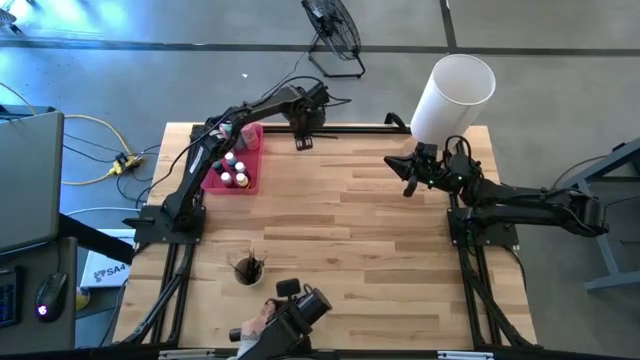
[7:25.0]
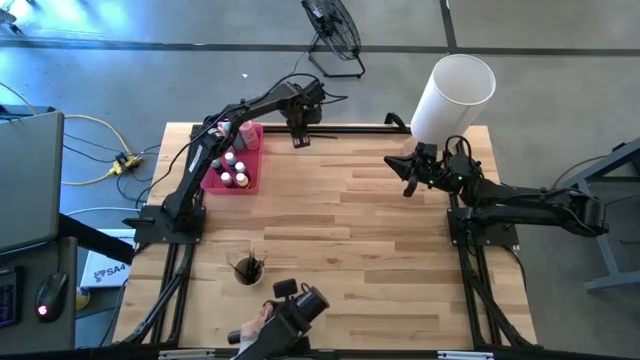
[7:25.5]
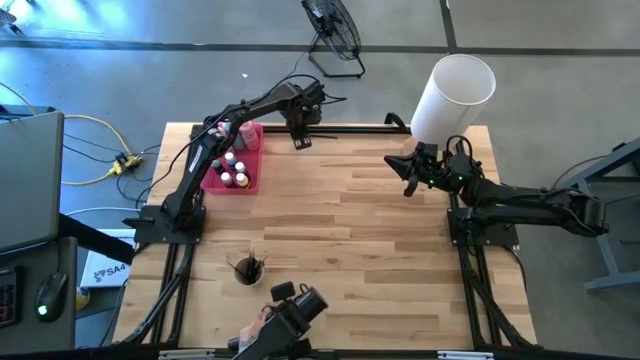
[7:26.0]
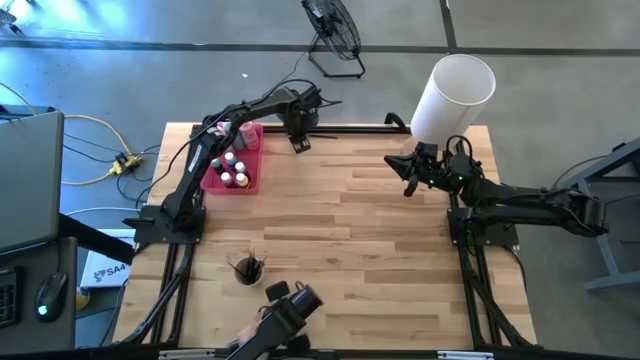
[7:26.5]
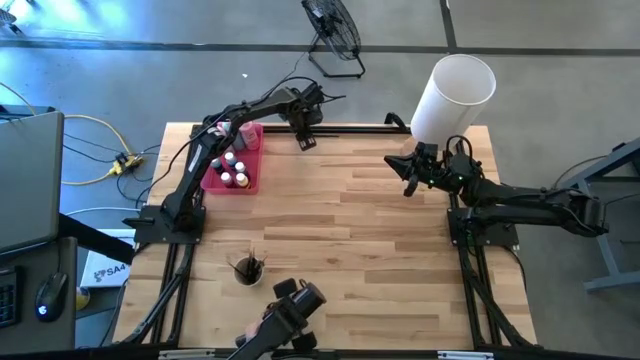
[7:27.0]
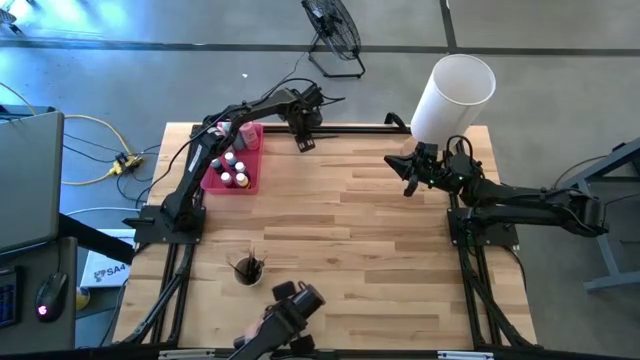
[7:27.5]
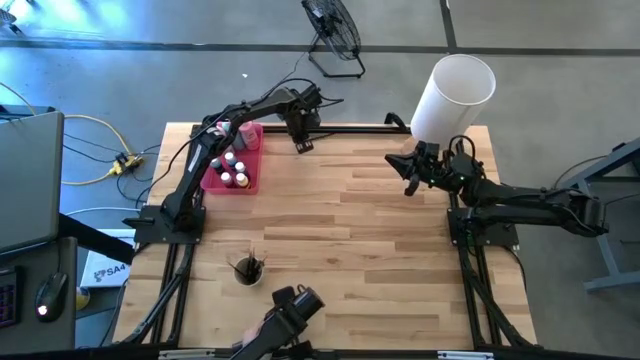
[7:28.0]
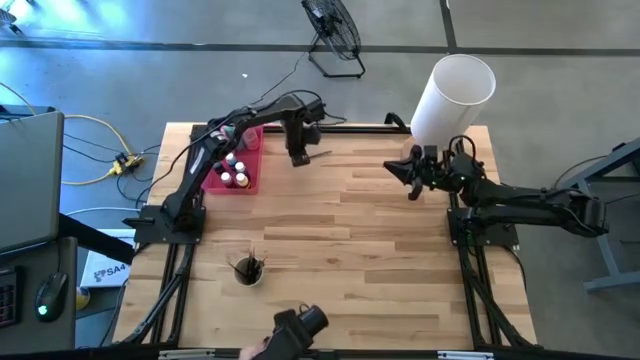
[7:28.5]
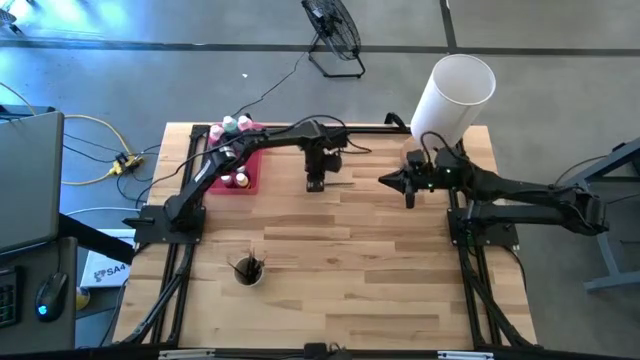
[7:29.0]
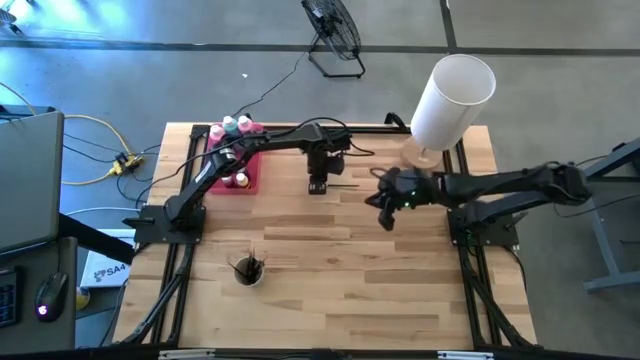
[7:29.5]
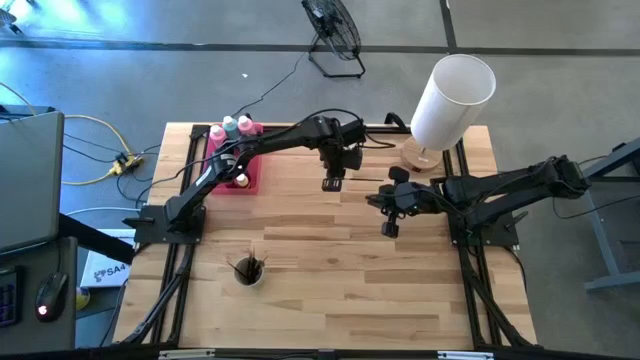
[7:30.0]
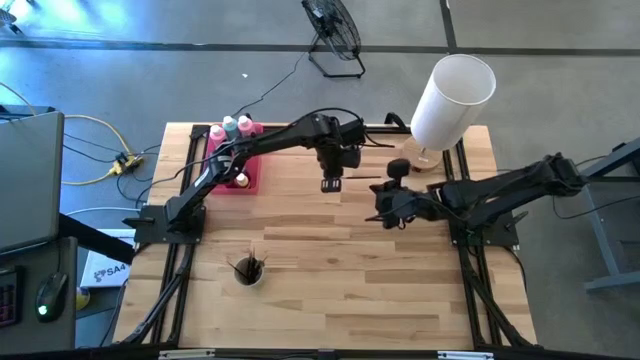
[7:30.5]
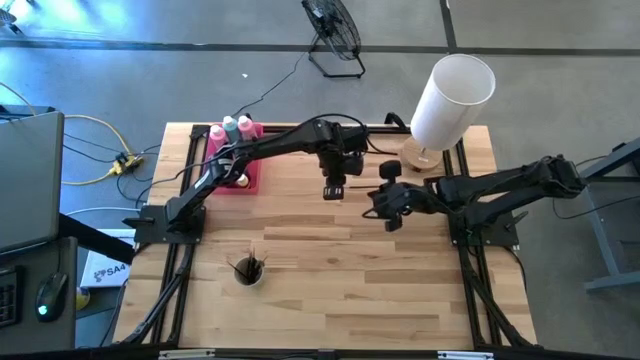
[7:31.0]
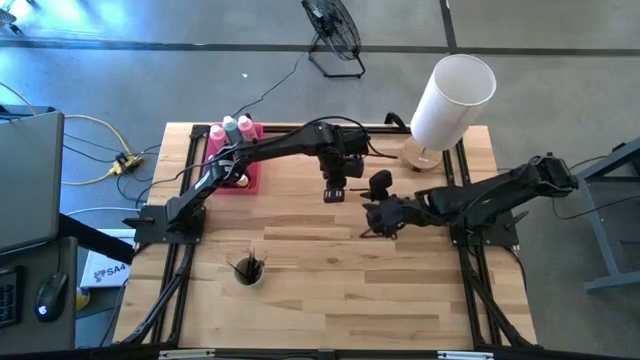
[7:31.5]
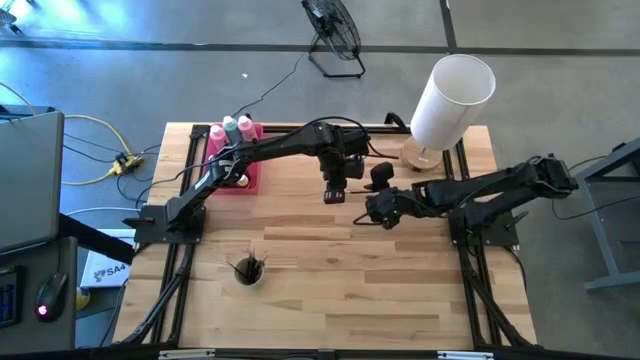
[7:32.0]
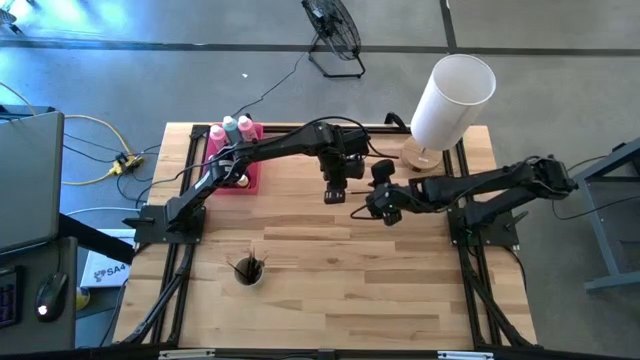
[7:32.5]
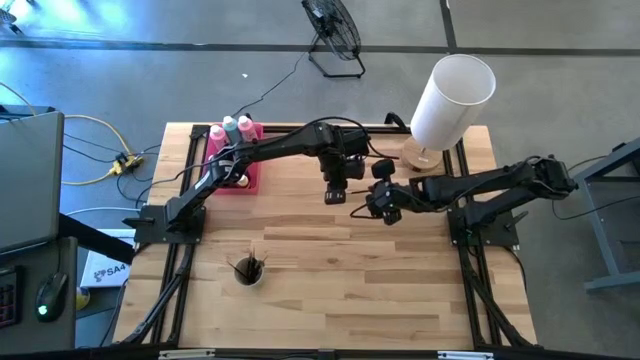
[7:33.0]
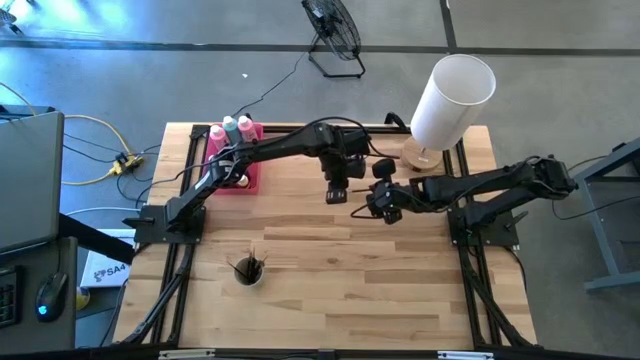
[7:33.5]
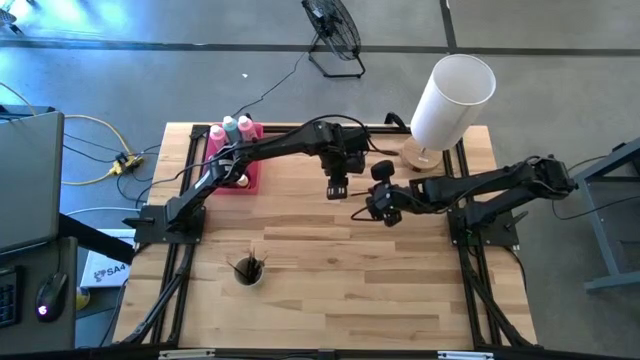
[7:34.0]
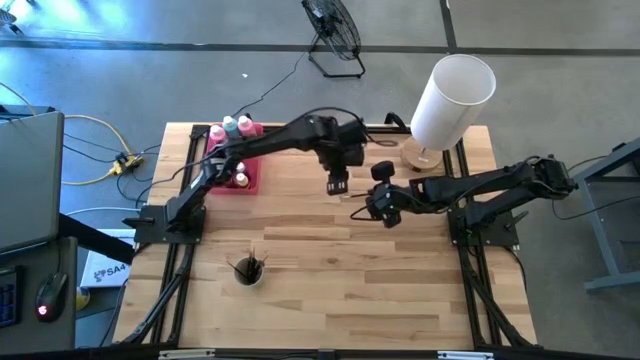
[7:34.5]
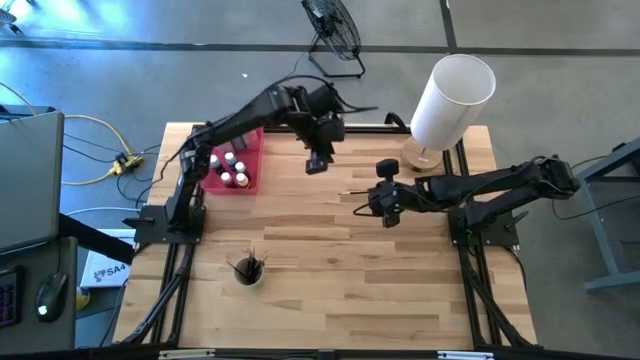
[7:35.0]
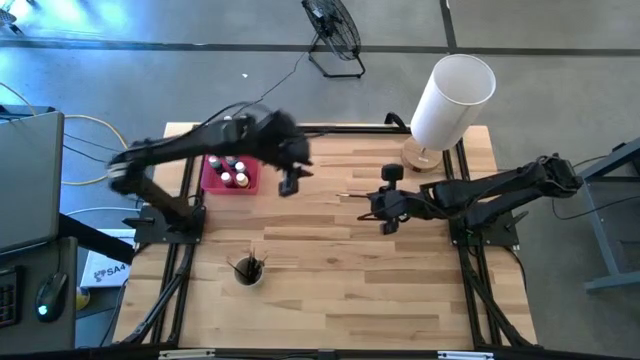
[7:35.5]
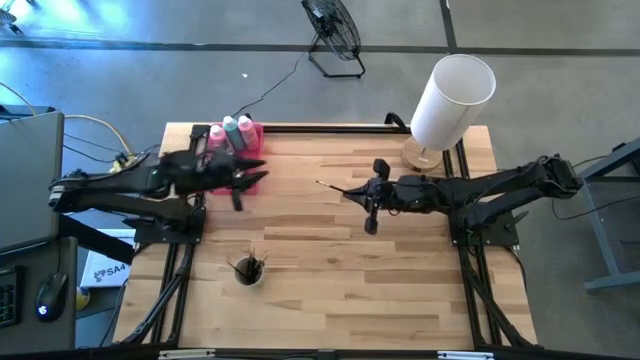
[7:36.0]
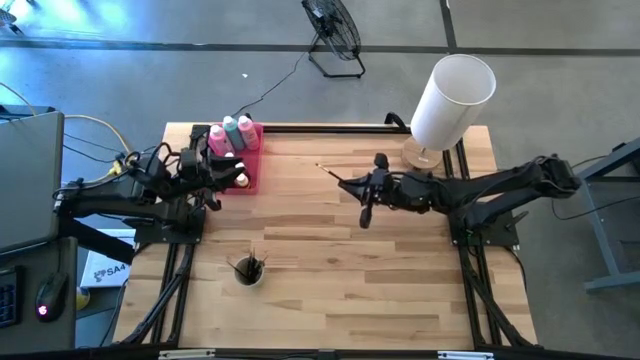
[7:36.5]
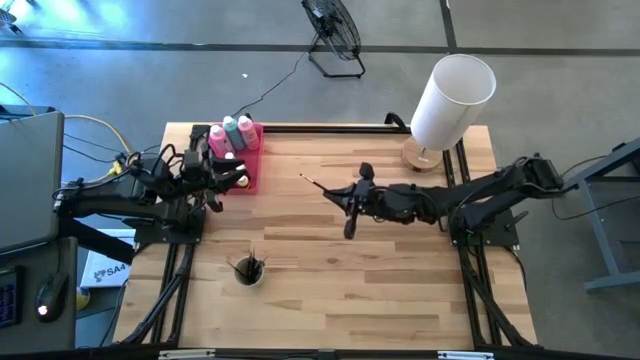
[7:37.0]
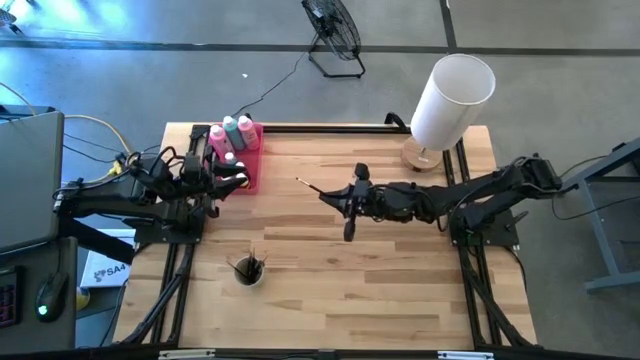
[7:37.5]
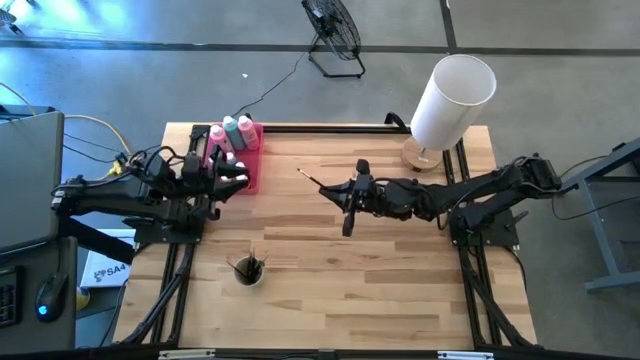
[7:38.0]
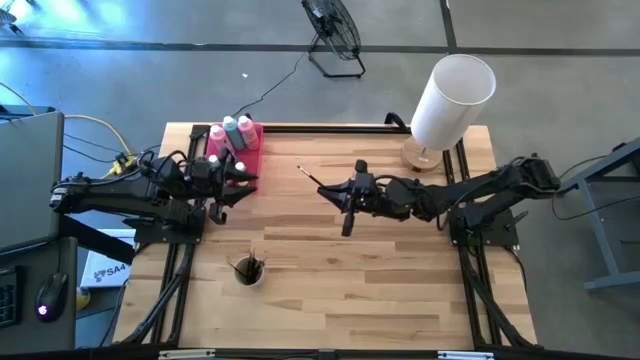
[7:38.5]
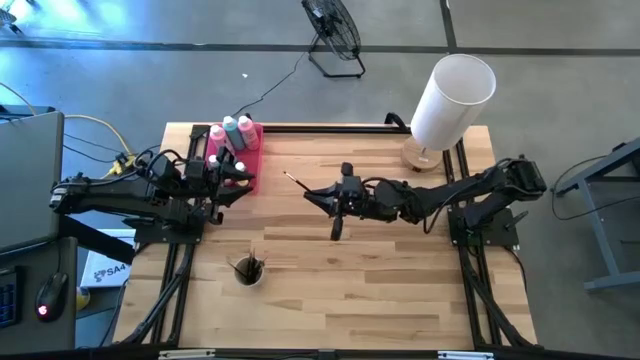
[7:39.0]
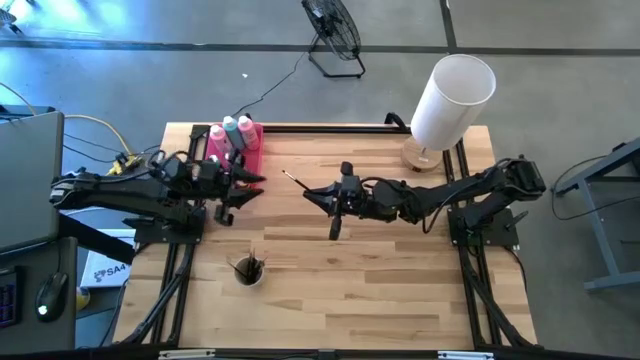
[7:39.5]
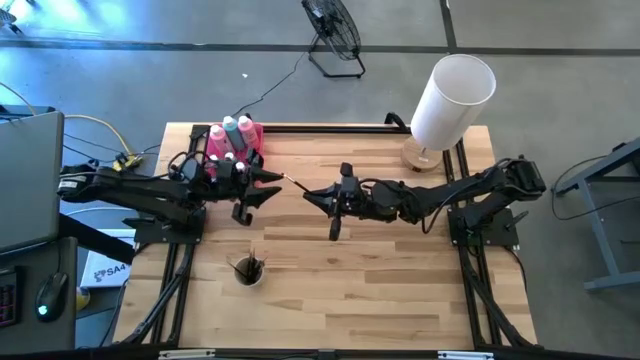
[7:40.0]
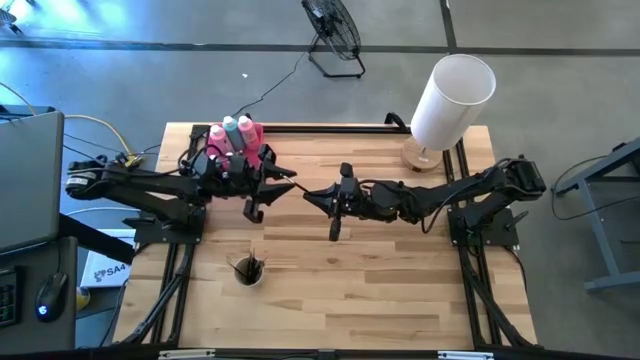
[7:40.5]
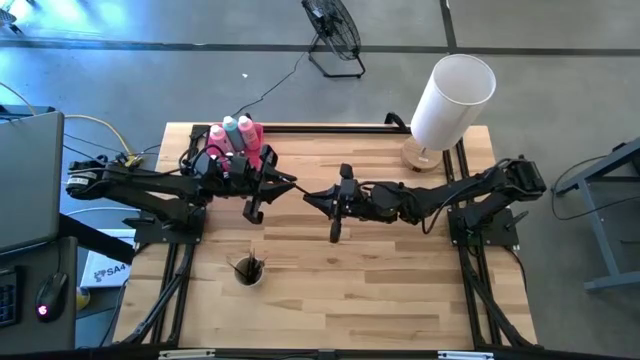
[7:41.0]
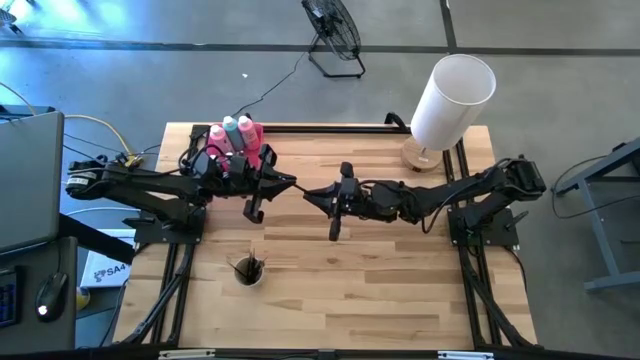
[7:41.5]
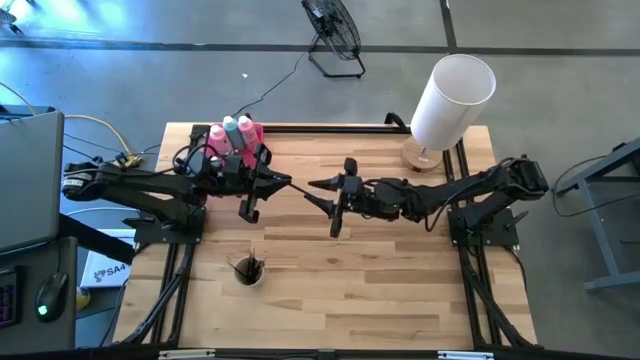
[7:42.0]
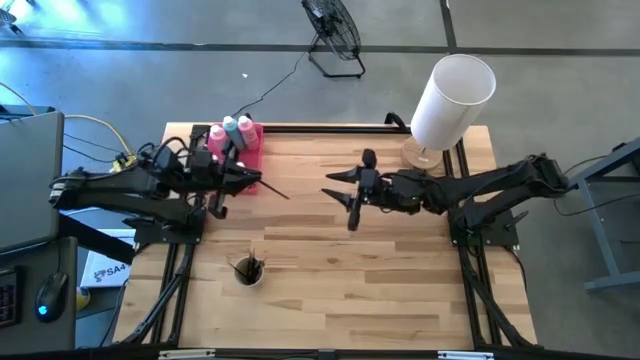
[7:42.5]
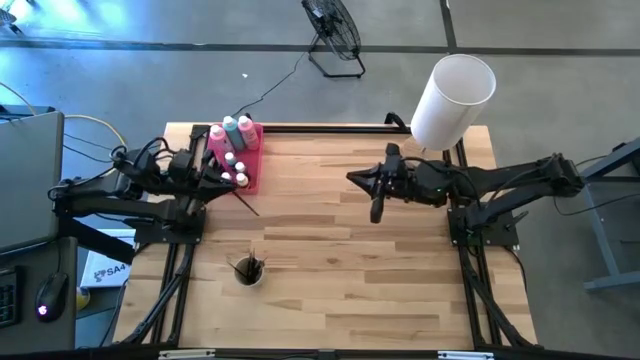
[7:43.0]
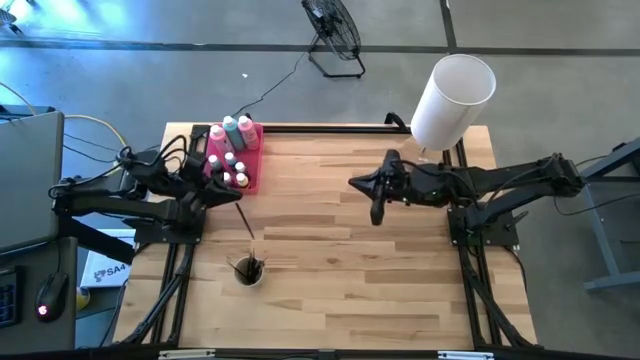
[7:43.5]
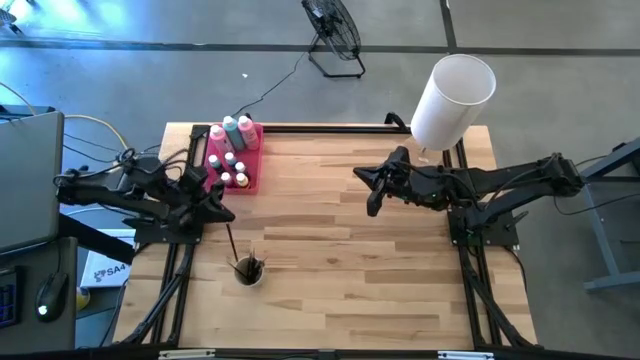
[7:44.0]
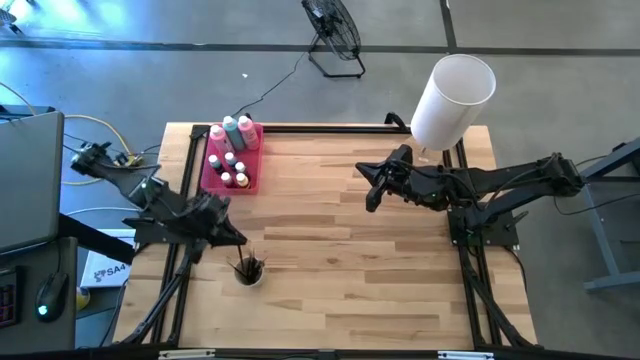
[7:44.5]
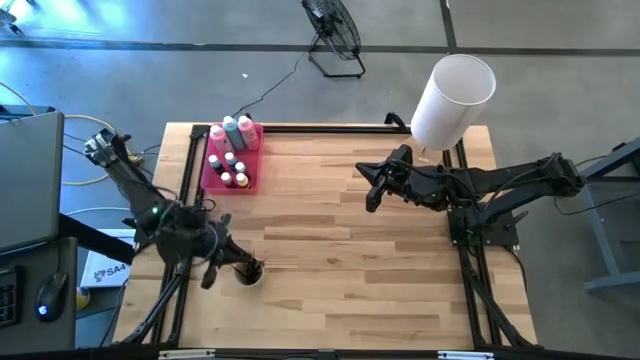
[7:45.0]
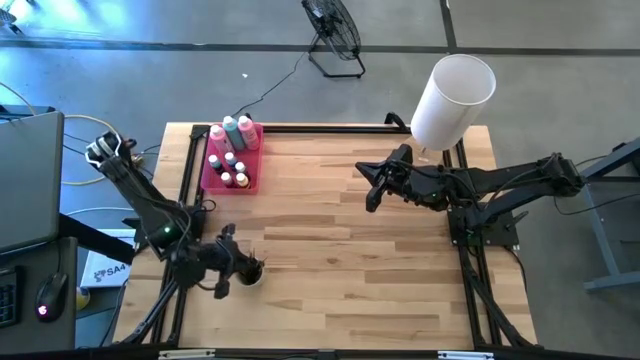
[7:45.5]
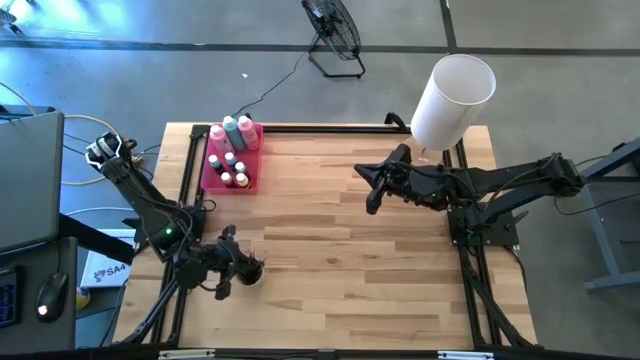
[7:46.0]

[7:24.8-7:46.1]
Task: Pick & Place Paint Supplies
Put the silver paintbrush into the light brown cup
